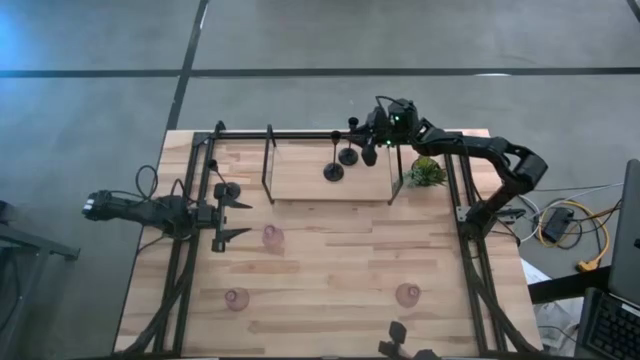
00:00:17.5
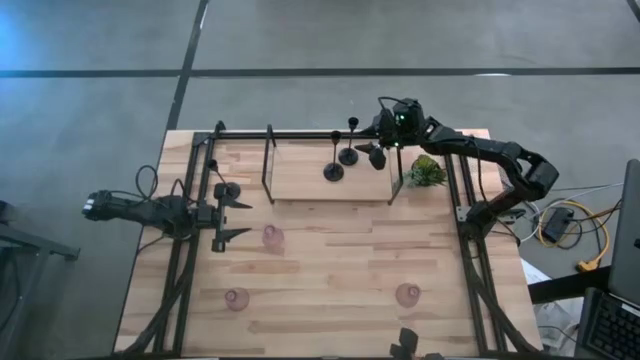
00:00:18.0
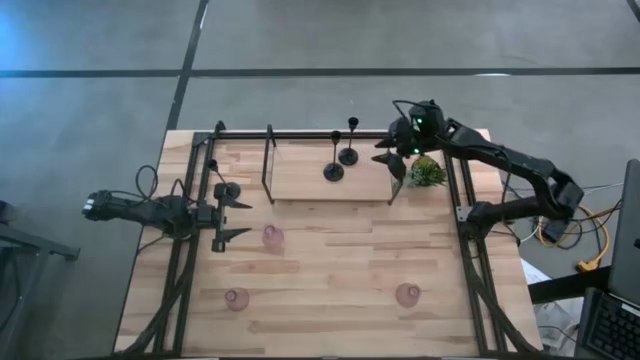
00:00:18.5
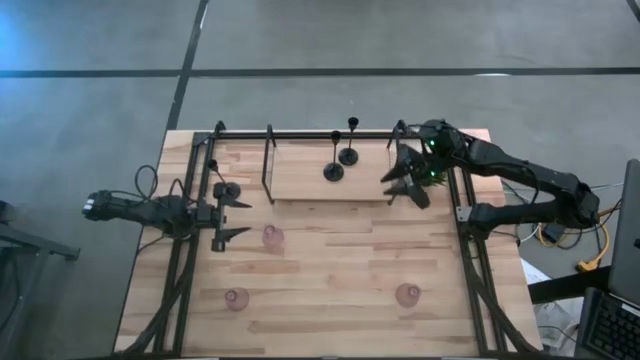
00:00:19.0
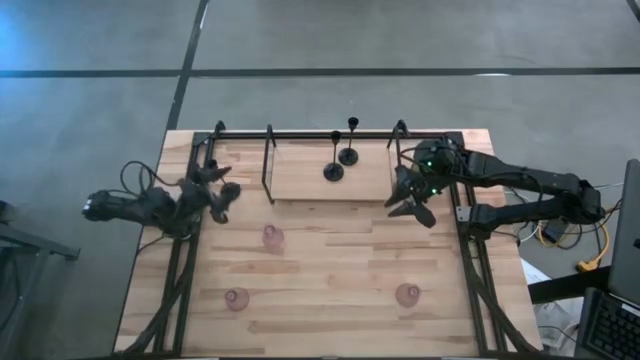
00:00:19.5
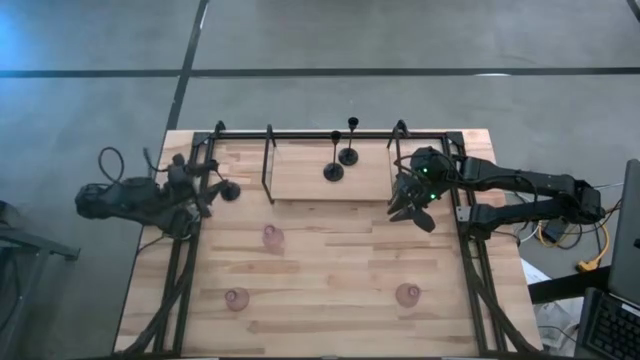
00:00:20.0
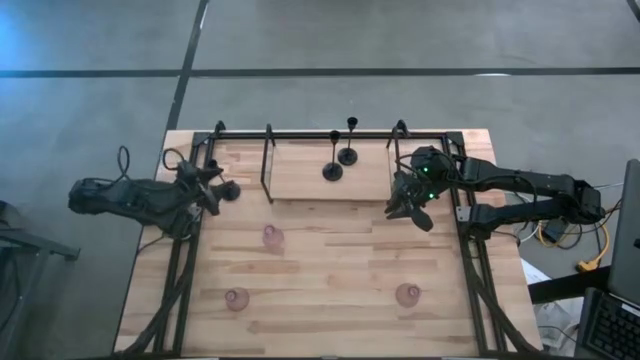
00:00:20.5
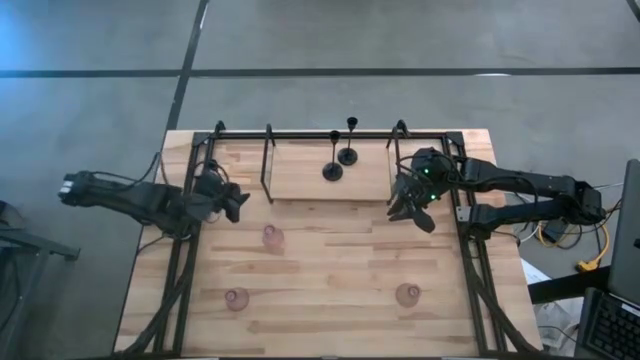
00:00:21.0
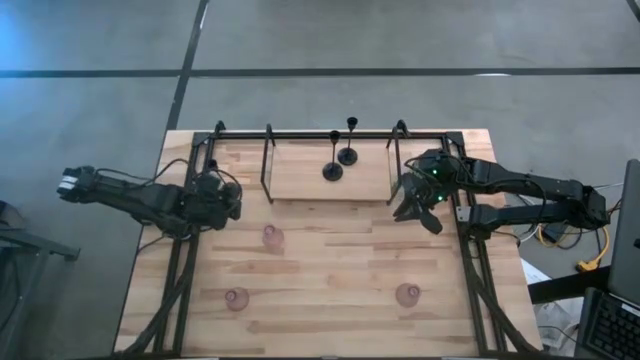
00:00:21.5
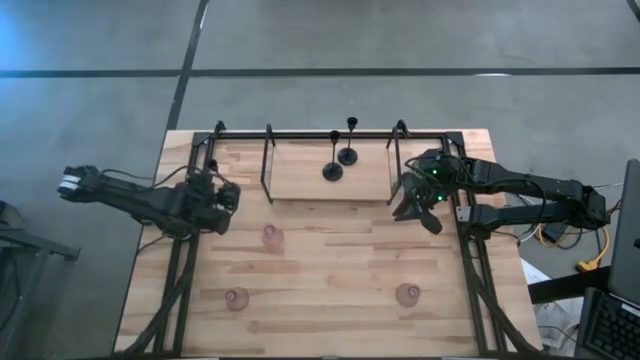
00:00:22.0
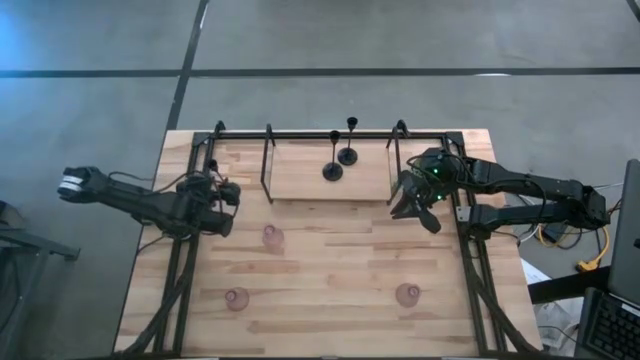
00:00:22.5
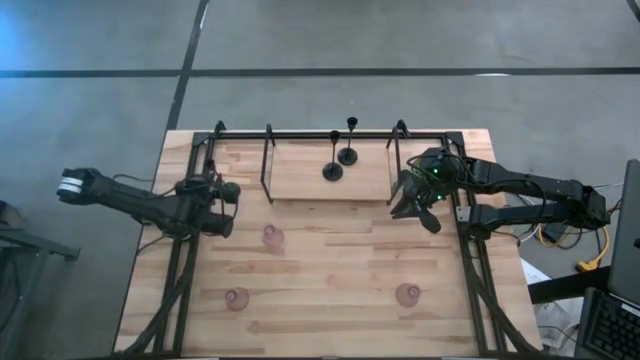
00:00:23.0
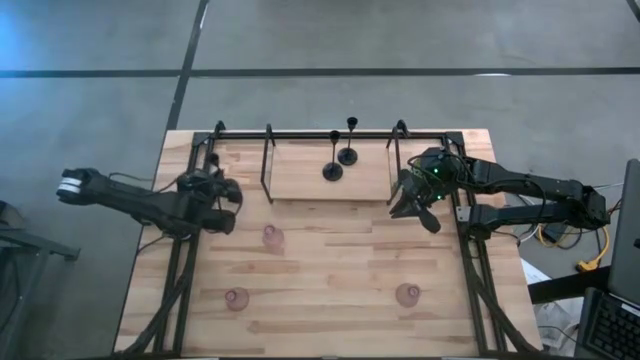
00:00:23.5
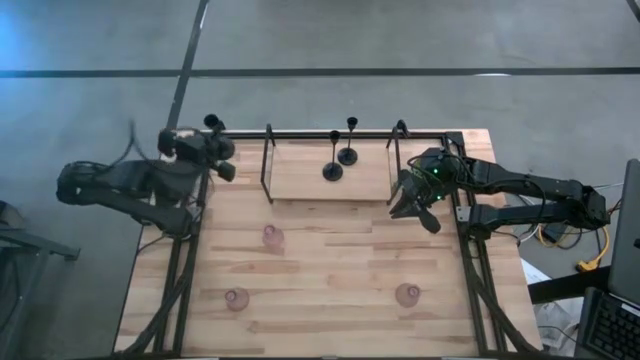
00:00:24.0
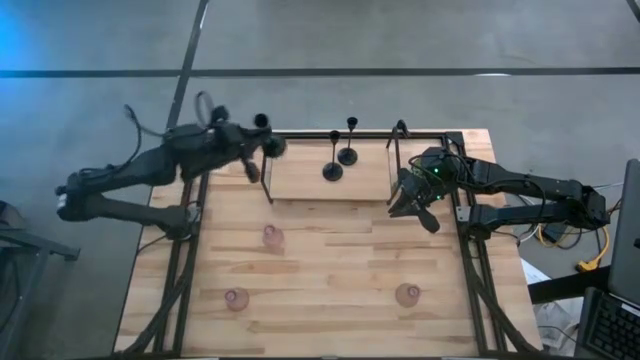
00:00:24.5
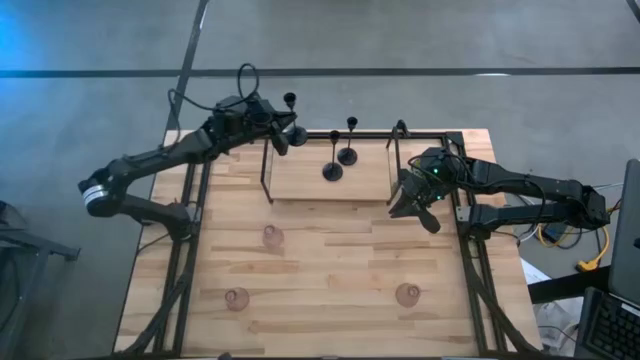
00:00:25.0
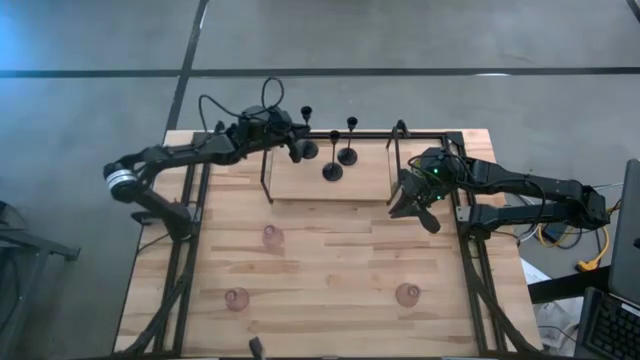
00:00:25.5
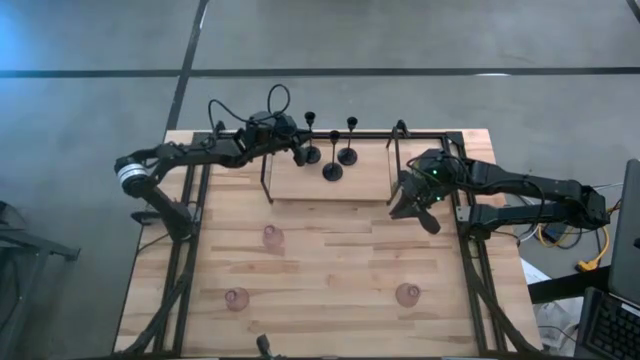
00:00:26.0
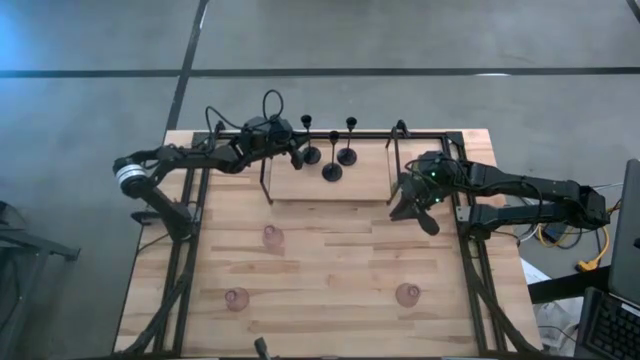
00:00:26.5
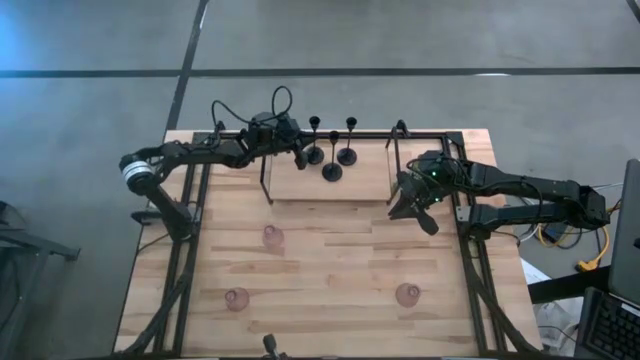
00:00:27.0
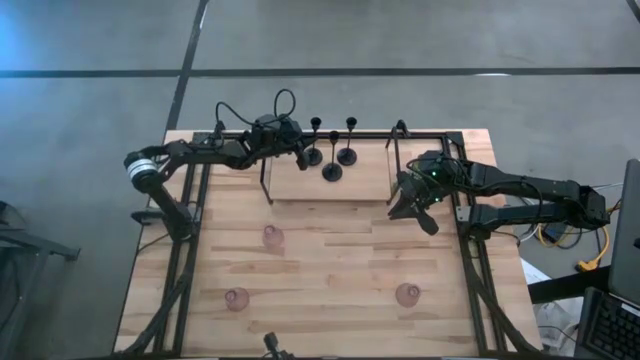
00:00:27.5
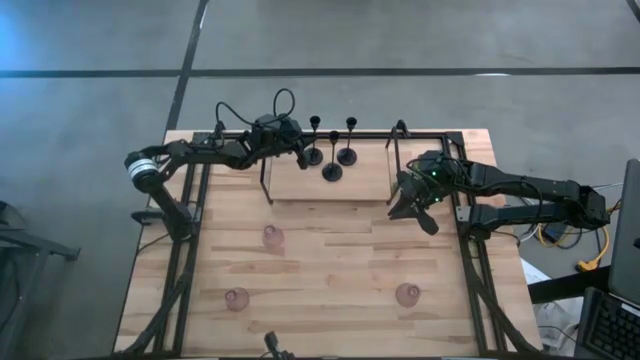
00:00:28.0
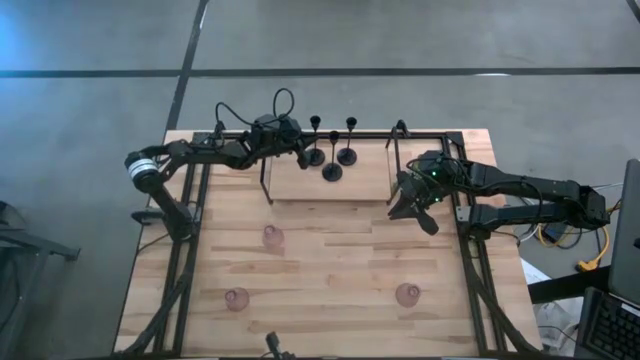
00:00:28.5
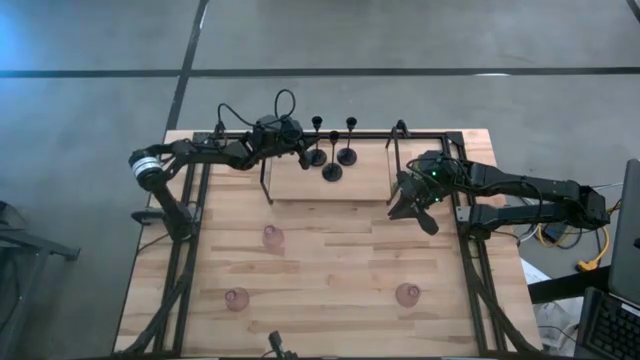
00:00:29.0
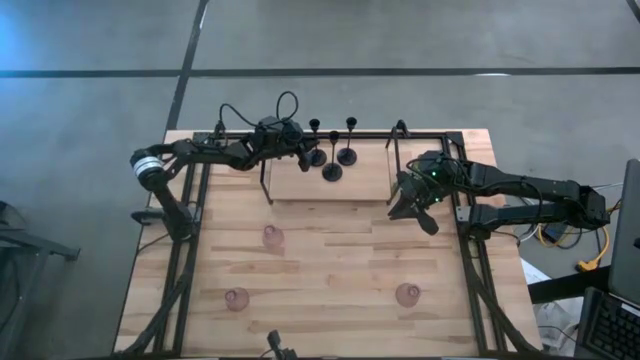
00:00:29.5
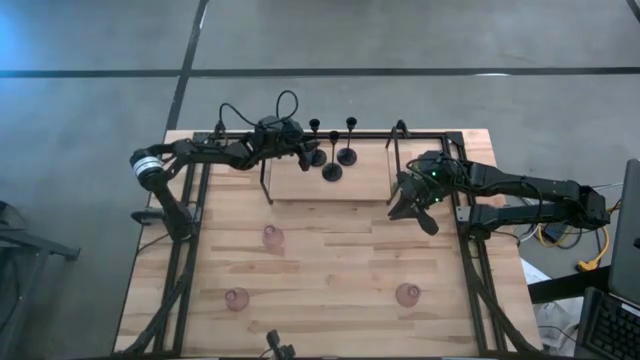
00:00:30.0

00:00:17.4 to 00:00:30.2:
Task: Pick & Place candle stick holders
Put the black candle holder on the shelf

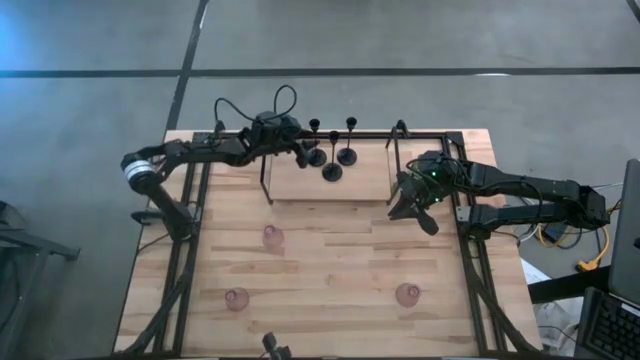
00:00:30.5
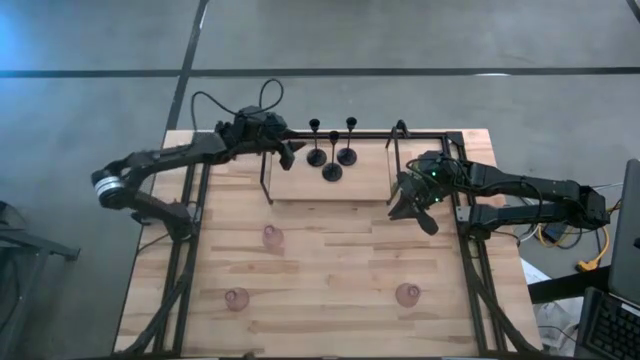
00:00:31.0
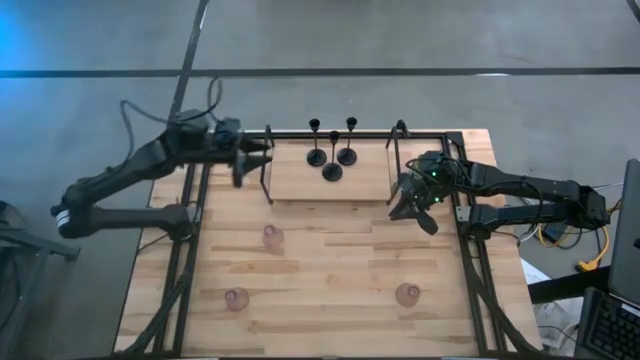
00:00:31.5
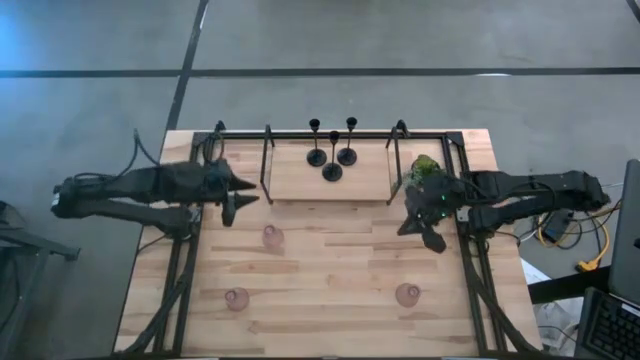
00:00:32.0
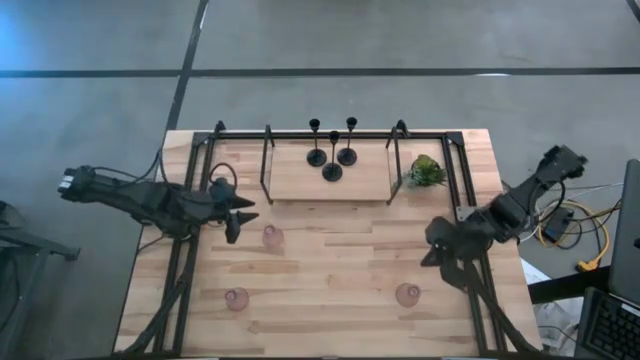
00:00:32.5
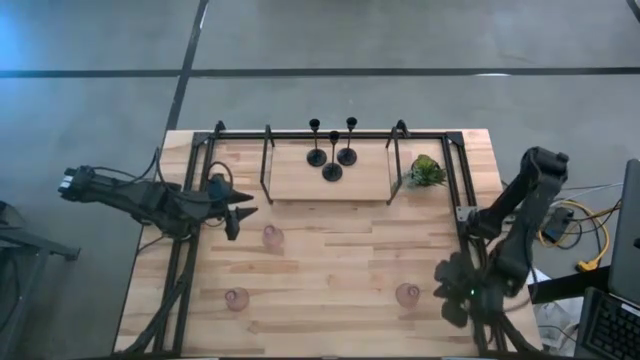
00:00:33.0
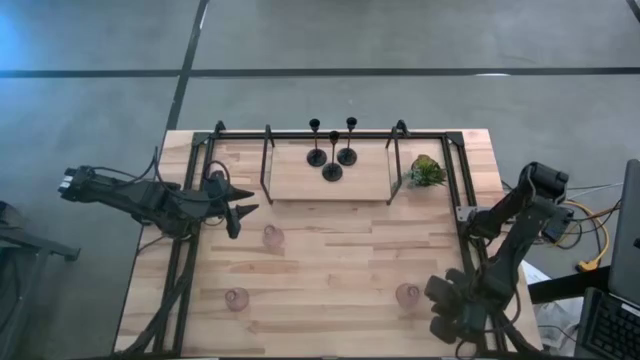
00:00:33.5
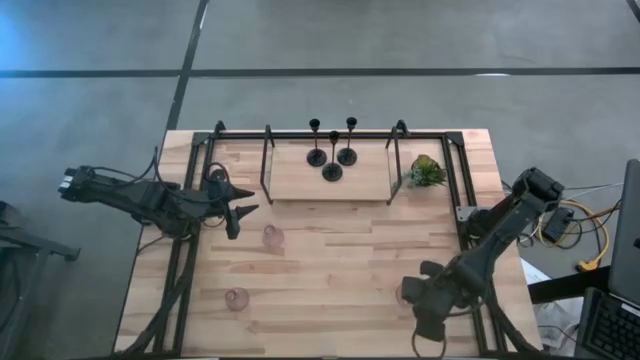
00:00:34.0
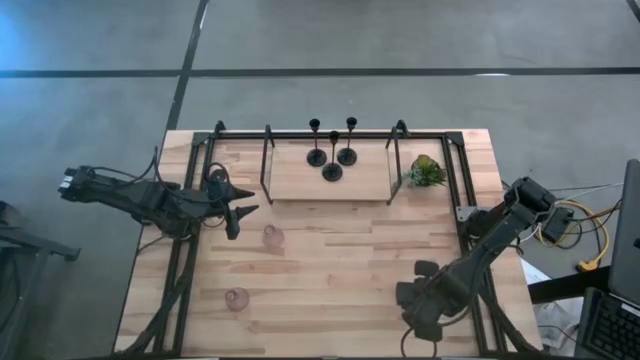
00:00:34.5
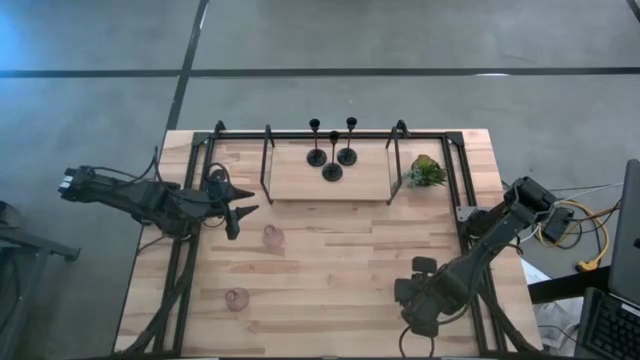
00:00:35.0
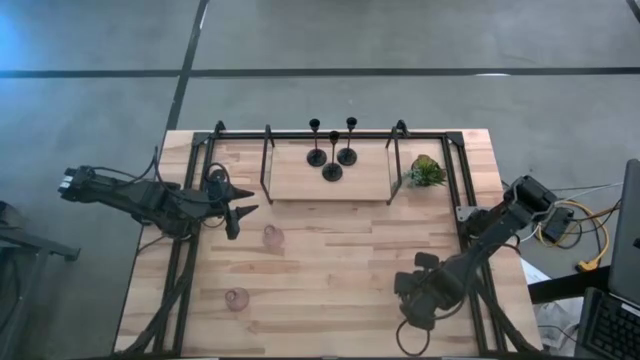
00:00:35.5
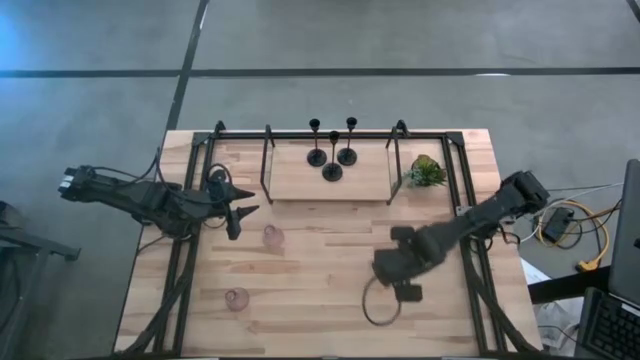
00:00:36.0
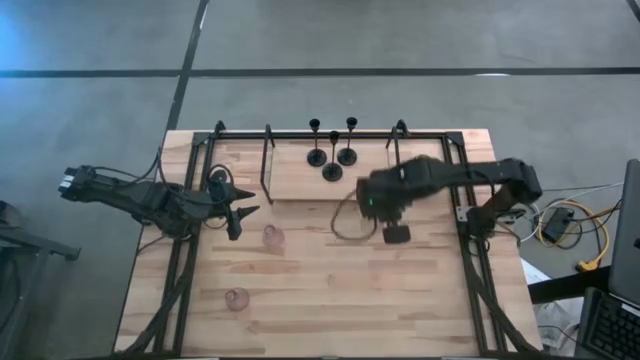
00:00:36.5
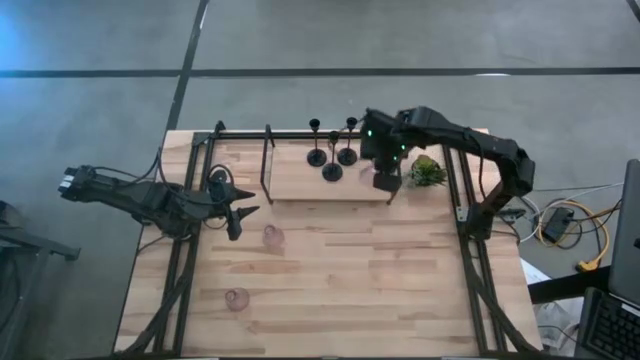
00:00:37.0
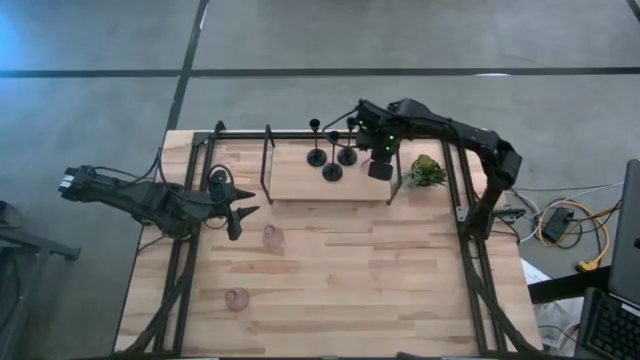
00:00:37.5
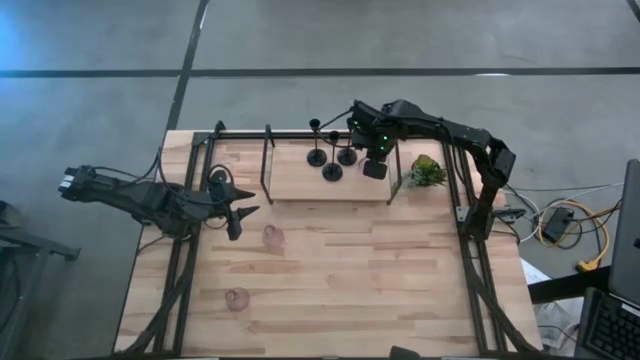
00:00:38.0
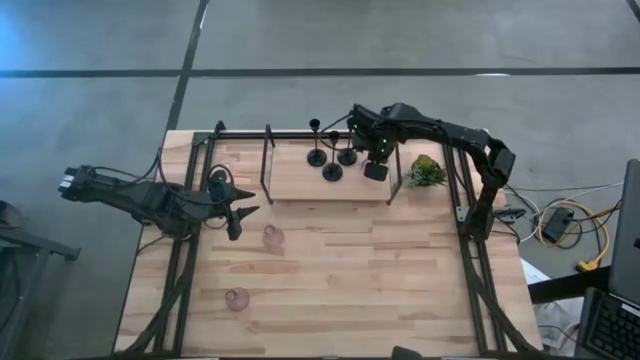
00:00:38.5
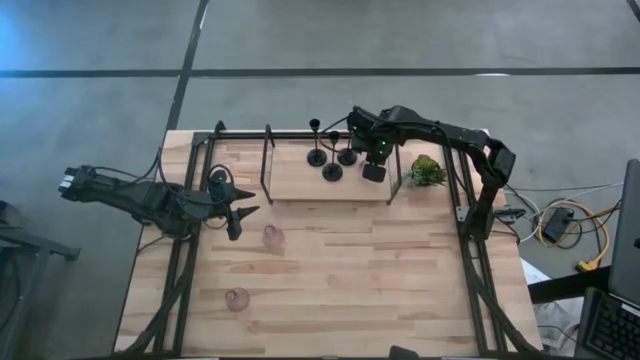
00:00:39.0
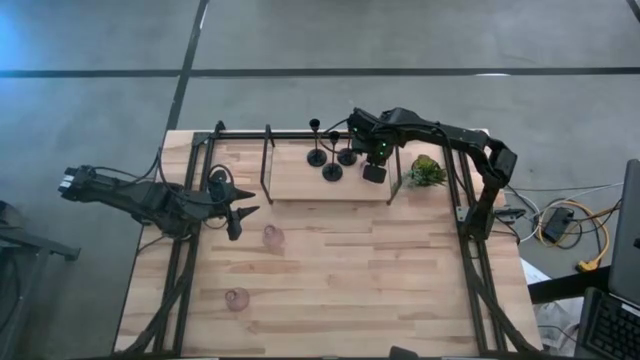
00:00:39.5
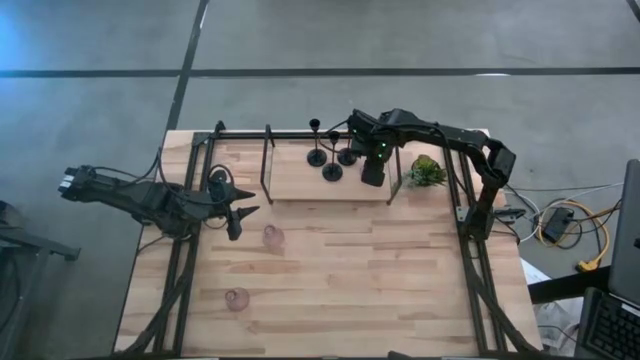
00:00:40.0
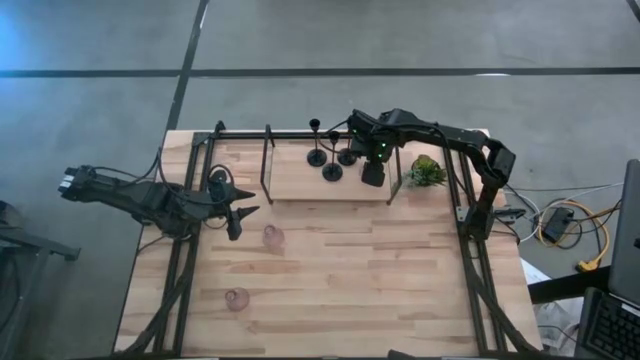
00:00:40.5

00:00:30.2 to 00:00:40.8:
Put the bottom right purple glass candle holder on the shelf
